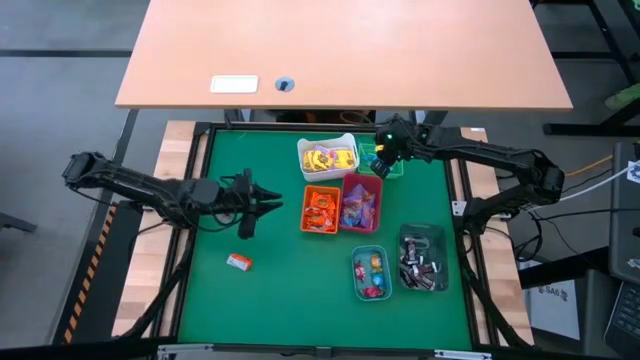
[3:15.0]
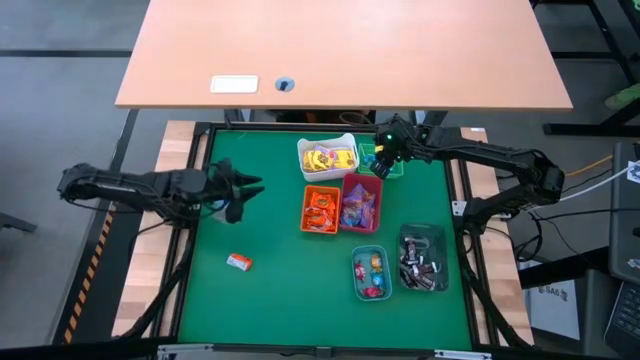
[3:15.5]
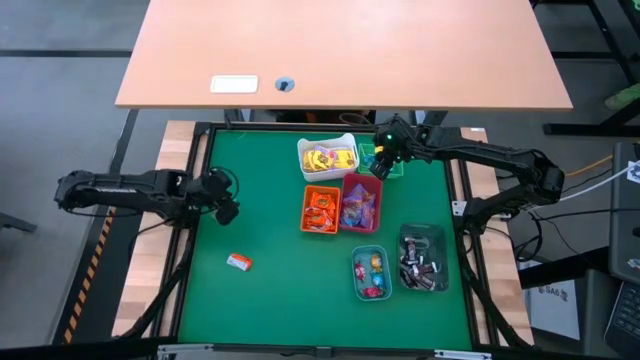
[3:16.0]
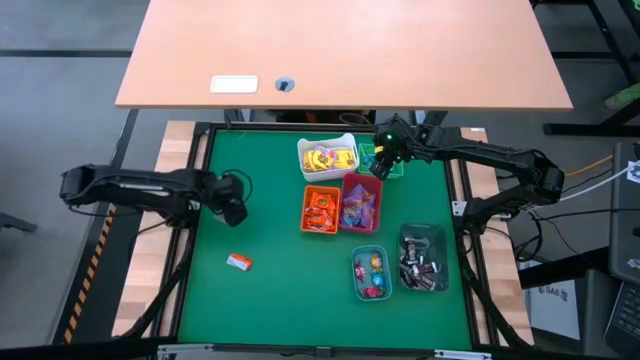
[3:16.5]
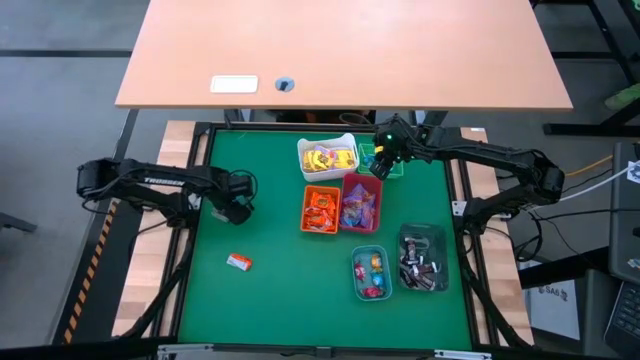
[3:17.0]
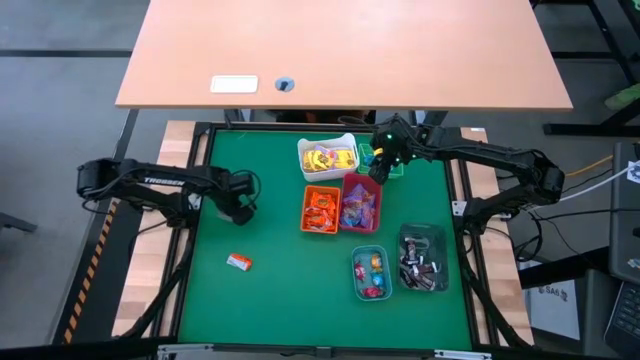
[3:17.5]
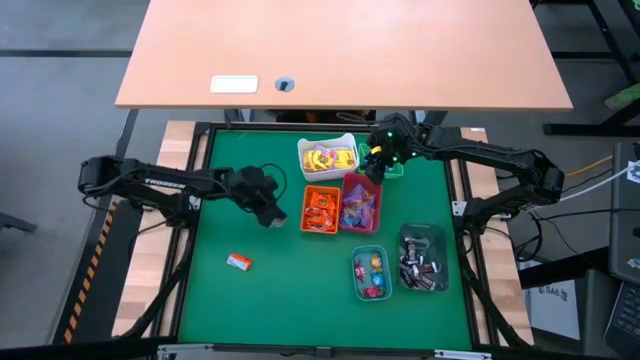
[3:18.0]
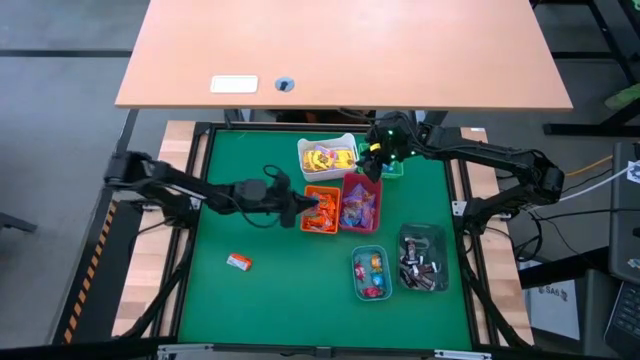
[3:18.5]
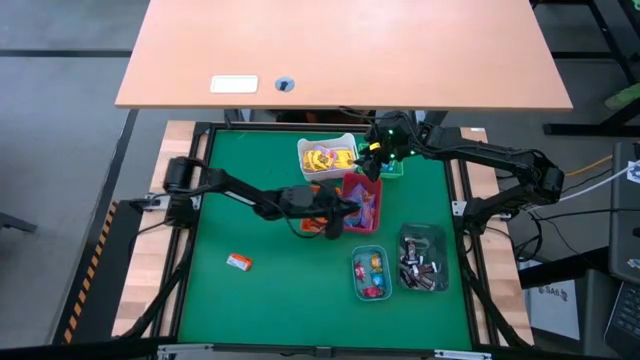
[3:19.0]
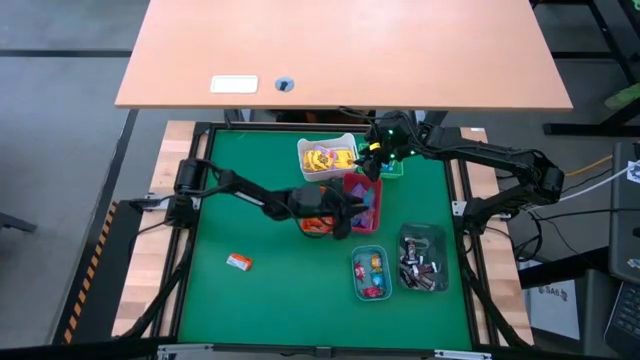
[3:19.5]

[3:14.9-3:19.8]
Task: Sort candy
Put the blue bag of candy into the red bin

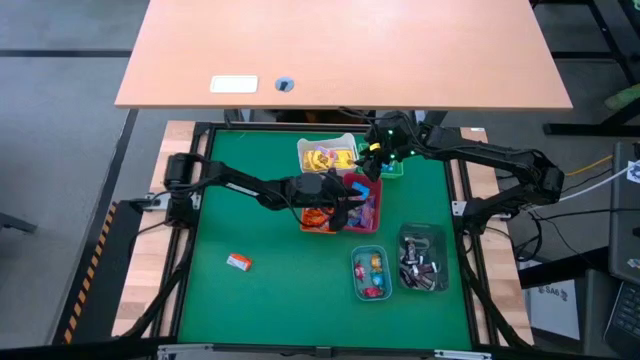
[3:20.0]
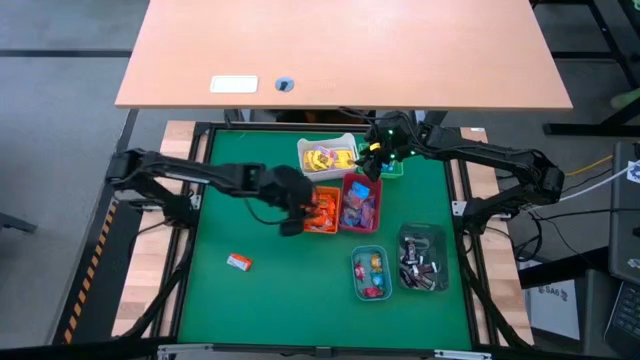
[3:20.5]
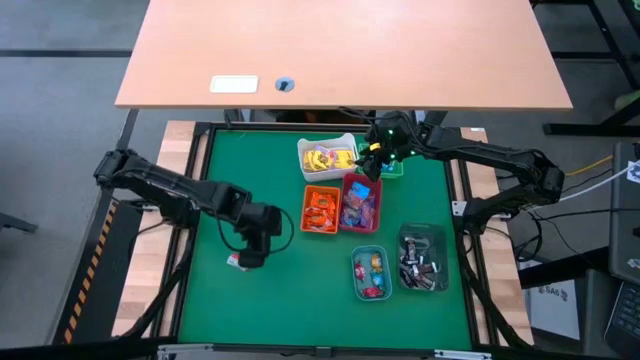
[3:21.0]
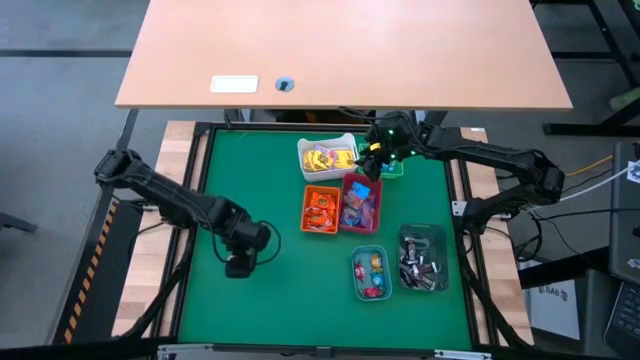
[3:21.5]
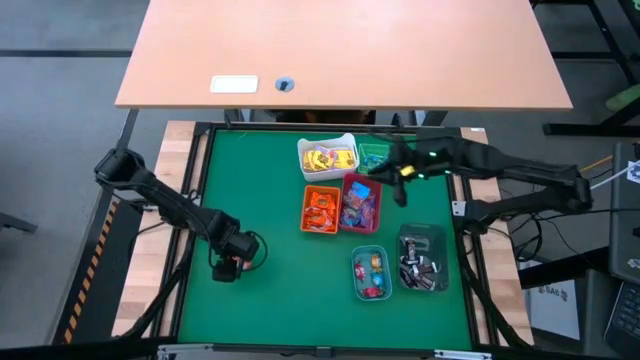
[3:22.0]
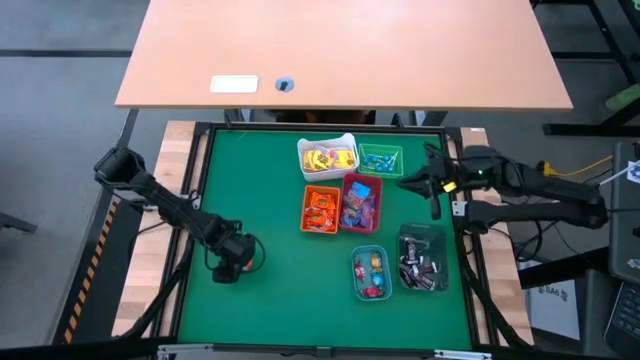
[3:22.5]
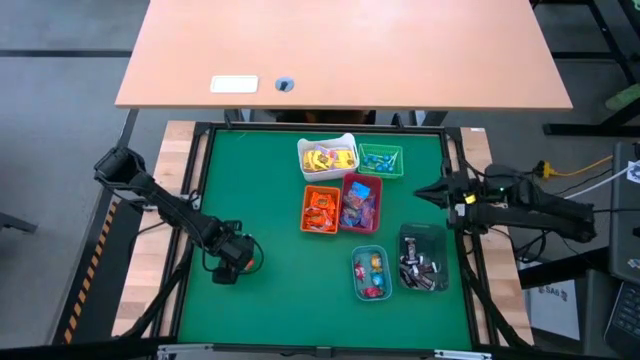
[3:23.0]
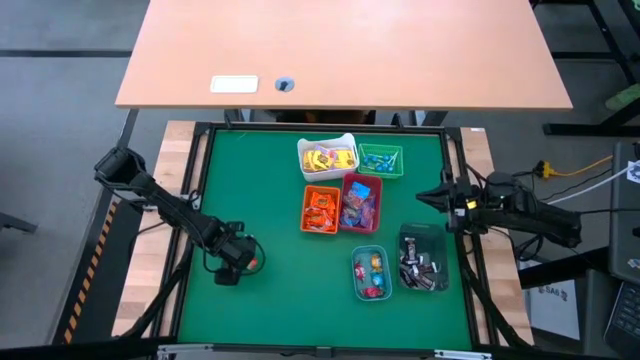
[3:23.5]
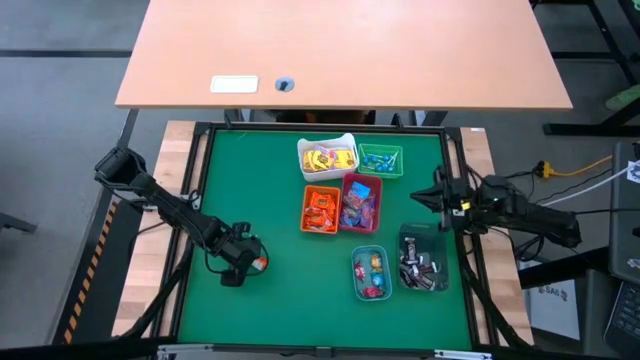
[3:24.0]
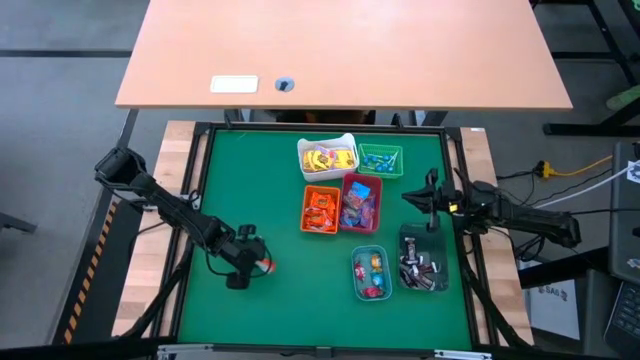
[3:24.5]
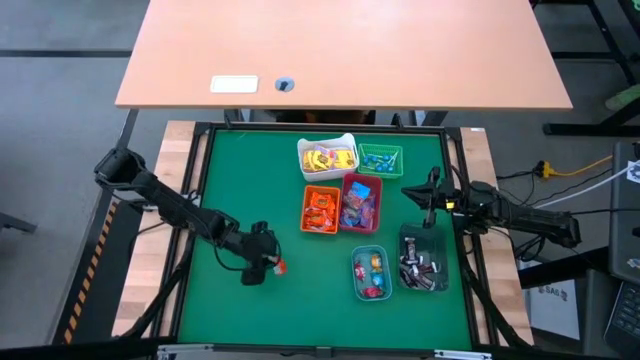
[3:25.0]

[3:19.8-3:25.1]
Put the orange candy into the orange basket

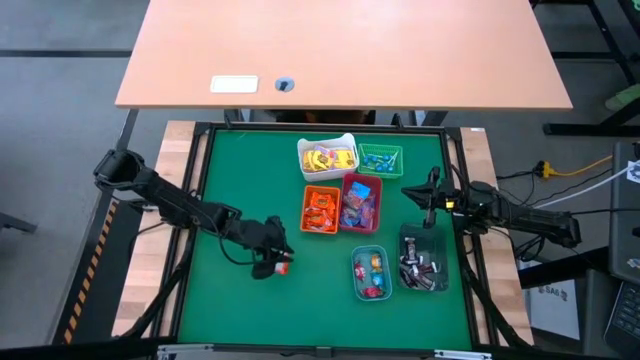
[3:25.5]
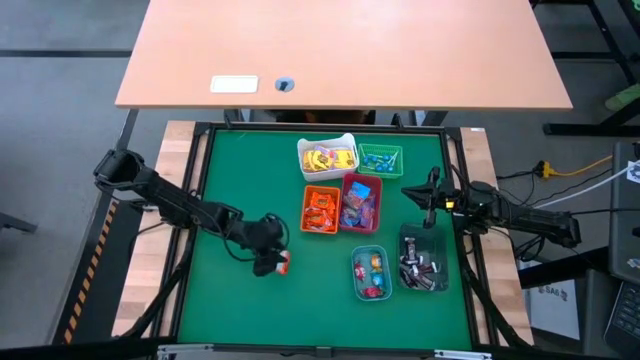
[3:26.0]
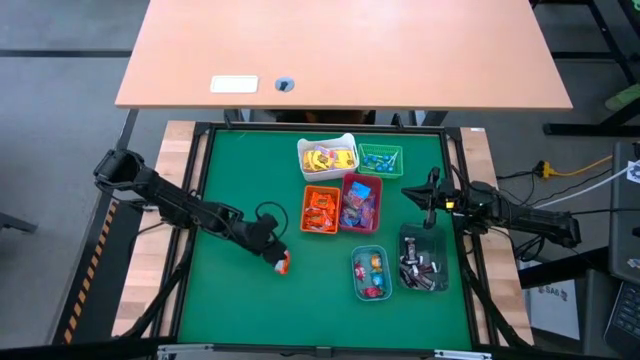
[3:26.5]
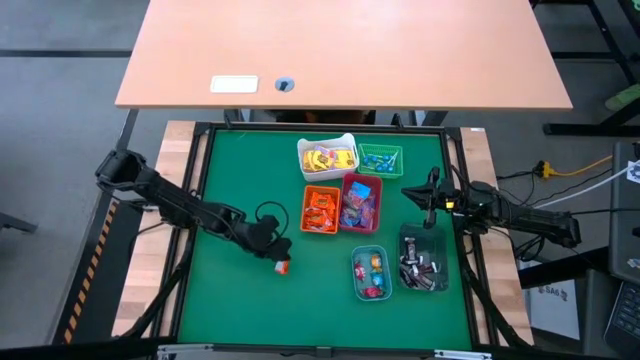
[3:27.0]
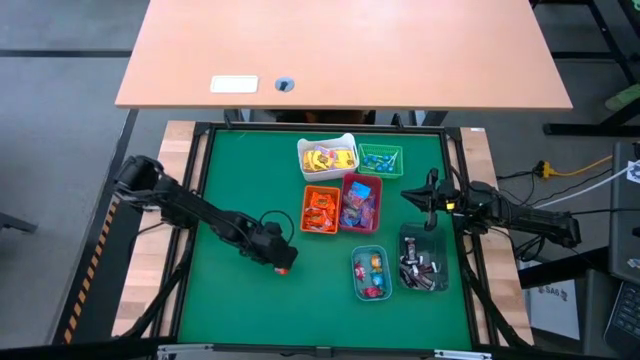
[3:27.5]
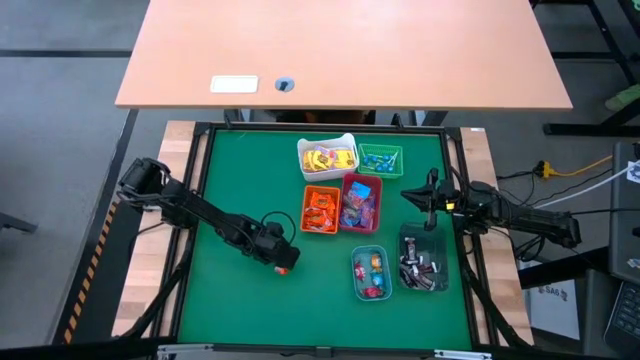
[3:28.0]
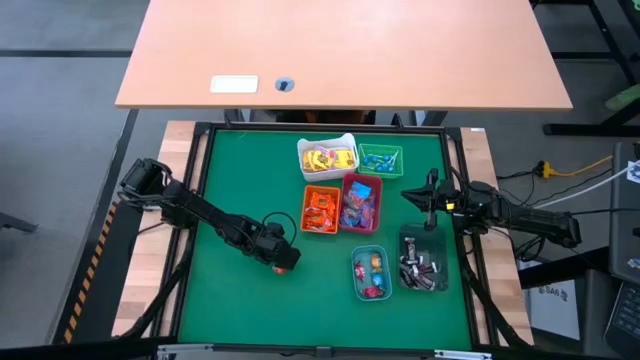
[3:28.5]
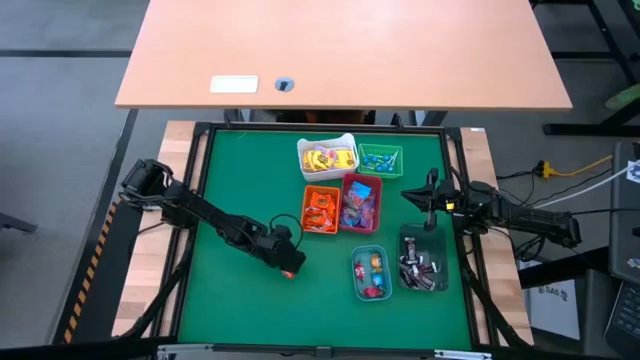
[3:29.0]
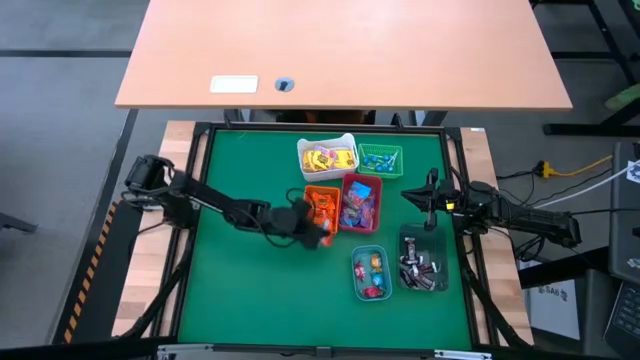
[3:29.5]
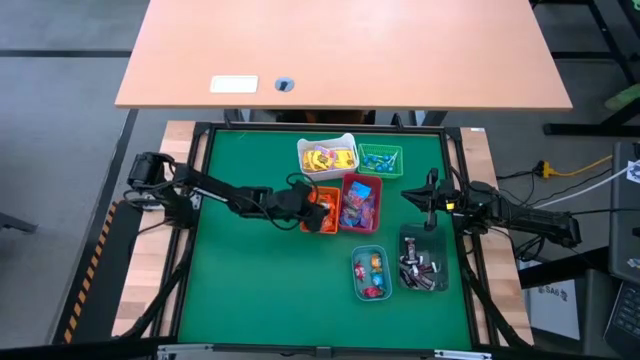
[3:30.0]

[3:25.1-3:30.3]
Put the orange chocolate into the orange basket

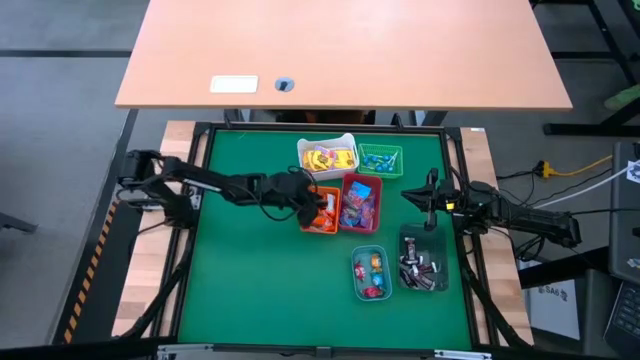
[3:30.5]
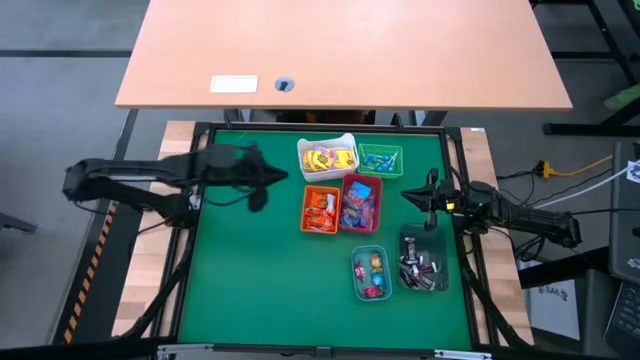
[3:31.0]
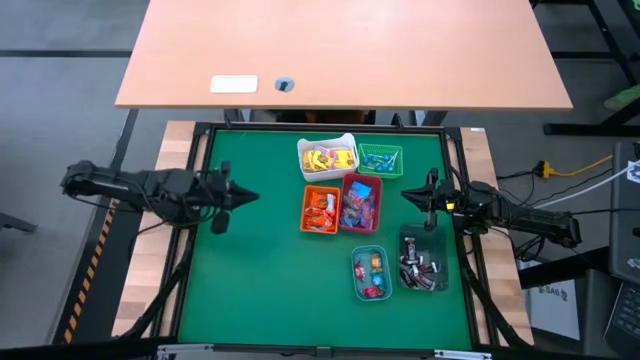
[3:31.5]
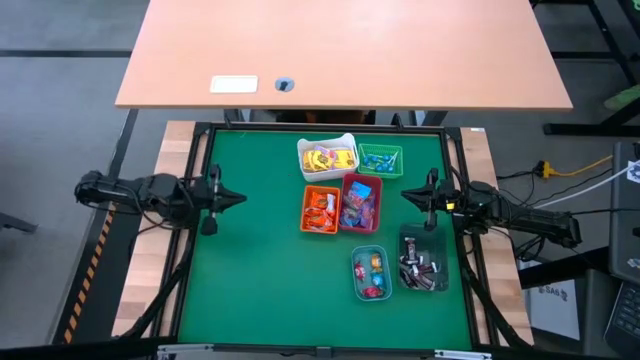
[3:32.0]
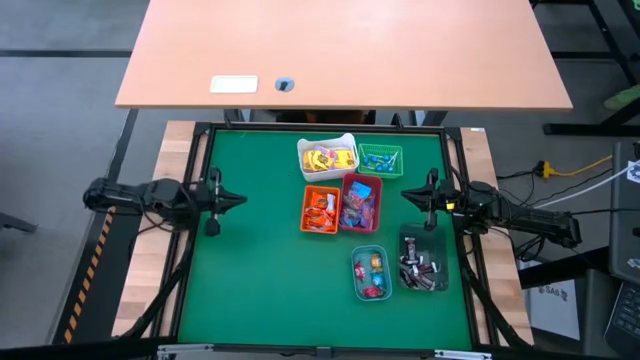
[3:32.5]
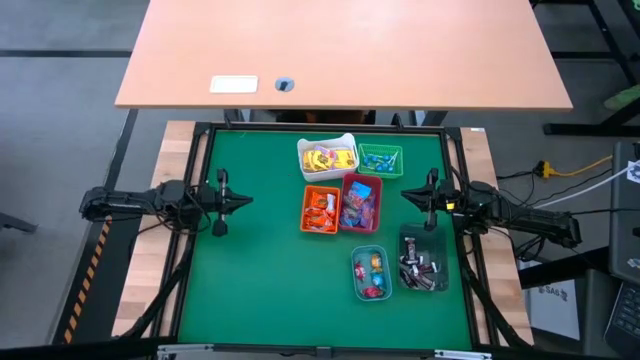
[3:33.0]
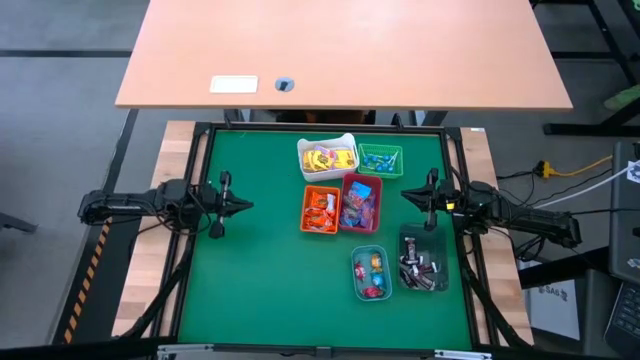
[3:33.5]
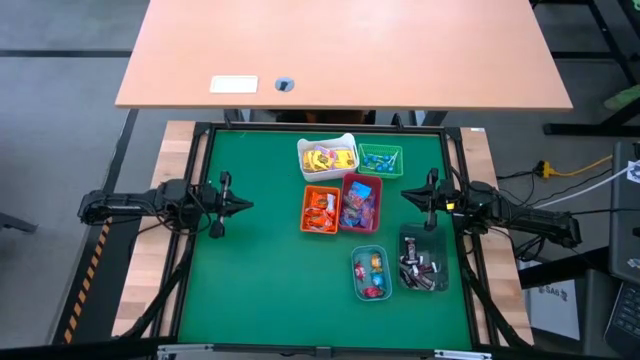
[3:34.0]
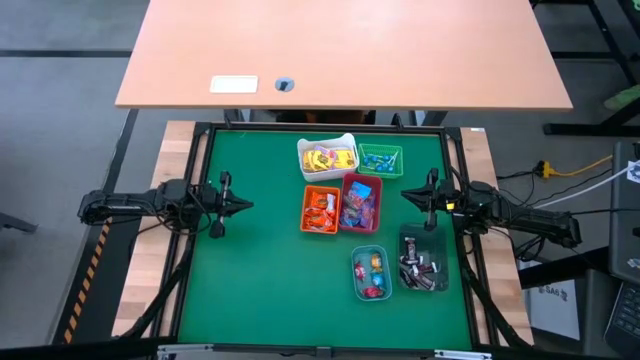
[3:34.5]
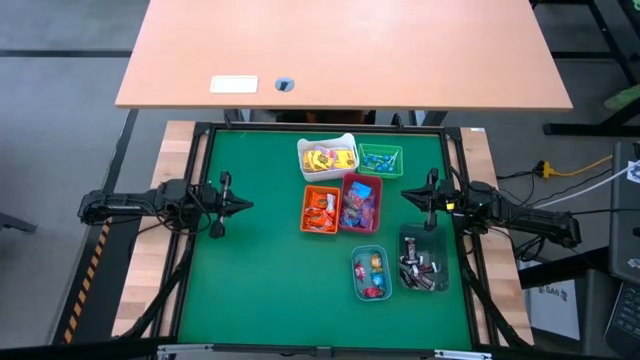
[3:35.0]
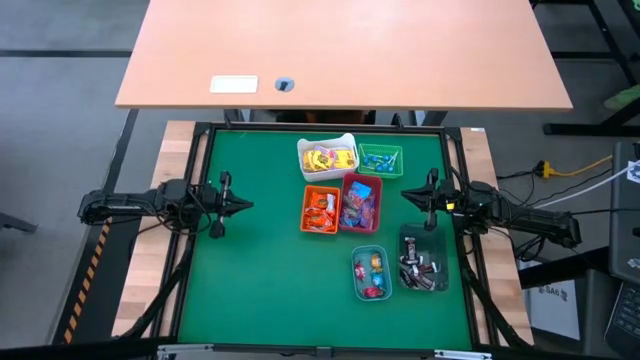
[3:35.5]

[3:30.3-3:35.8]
Return to Home Position
